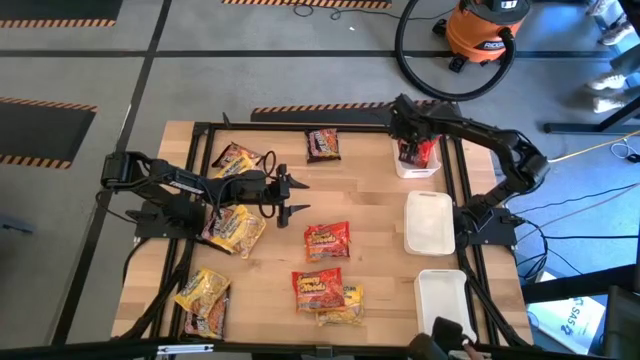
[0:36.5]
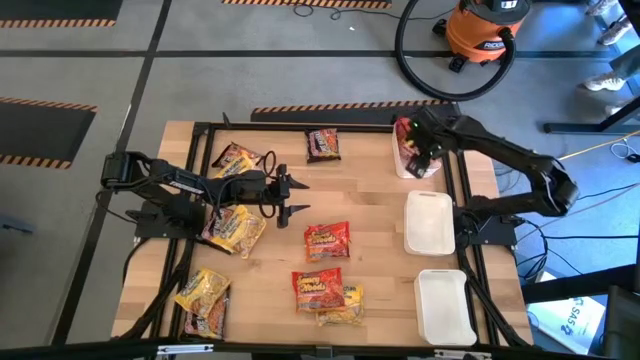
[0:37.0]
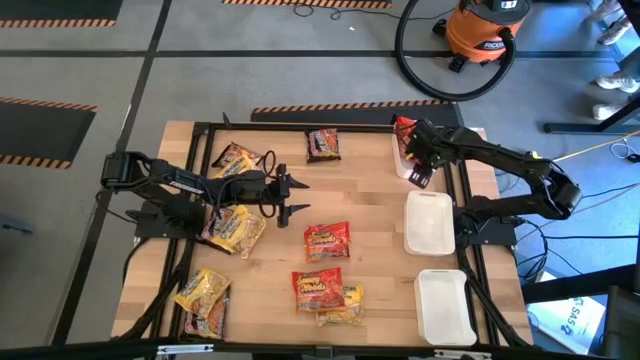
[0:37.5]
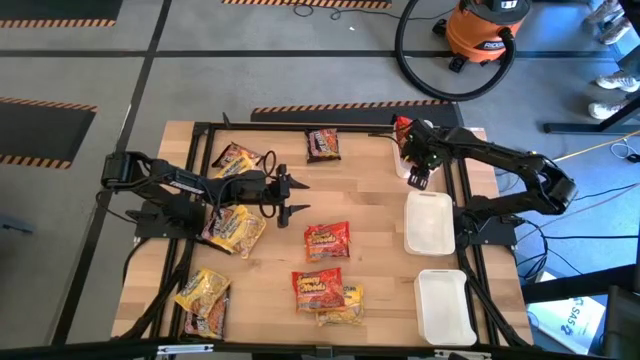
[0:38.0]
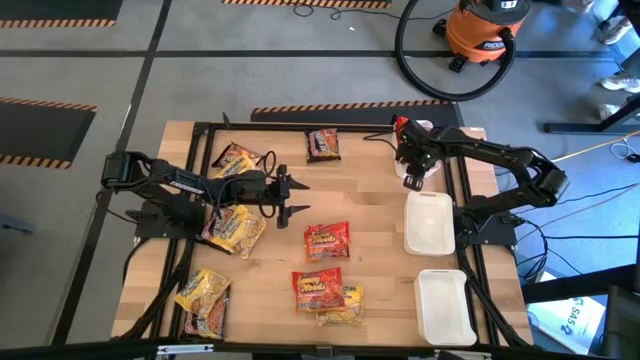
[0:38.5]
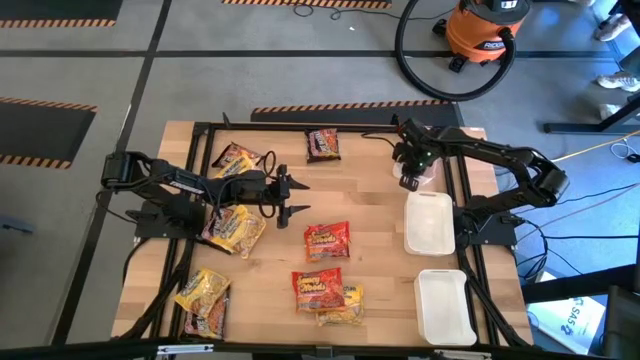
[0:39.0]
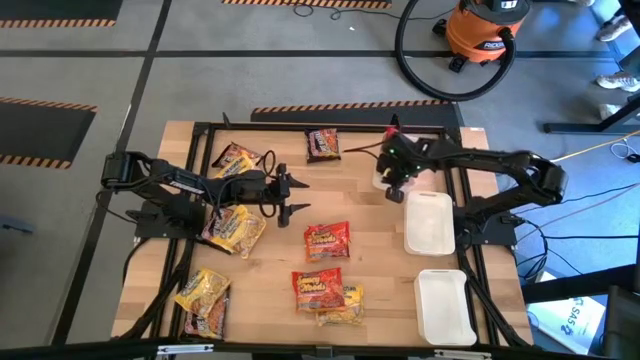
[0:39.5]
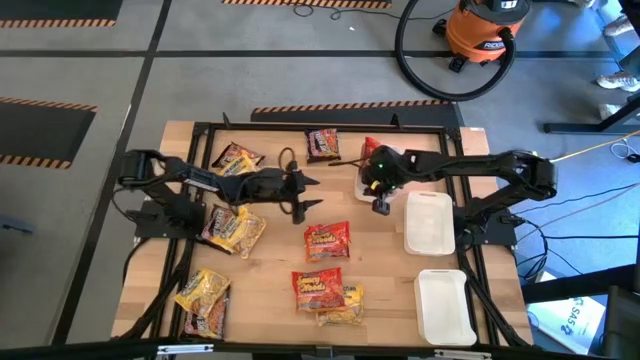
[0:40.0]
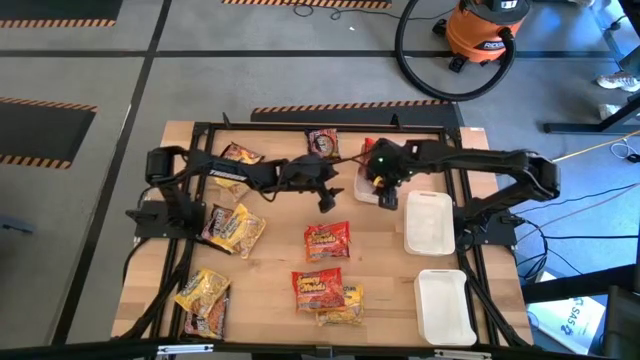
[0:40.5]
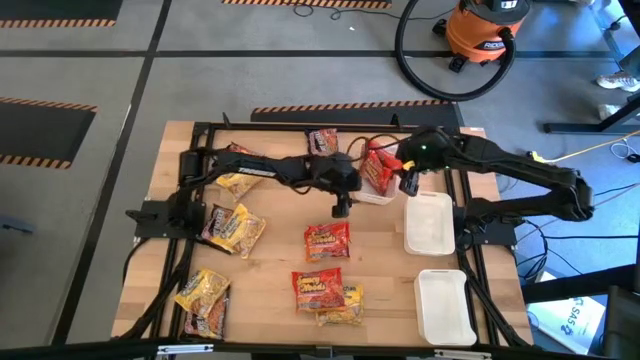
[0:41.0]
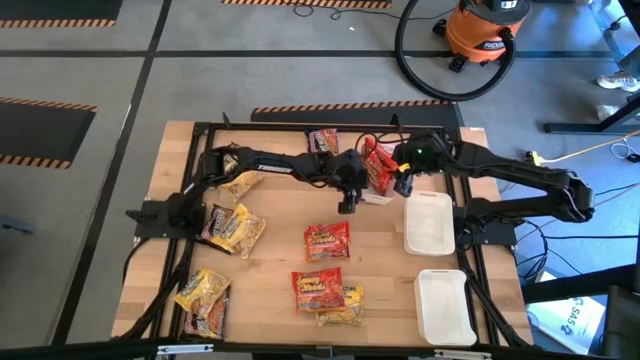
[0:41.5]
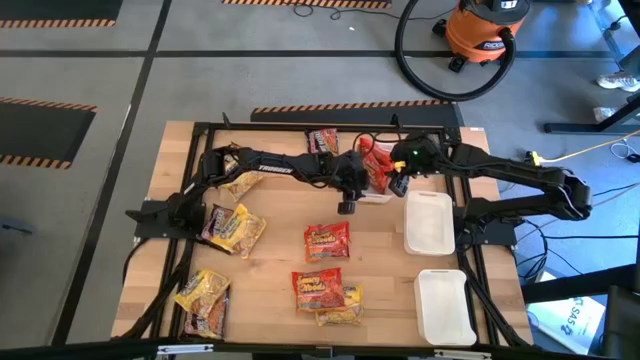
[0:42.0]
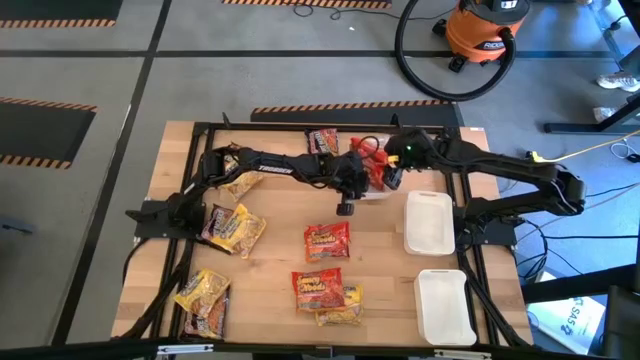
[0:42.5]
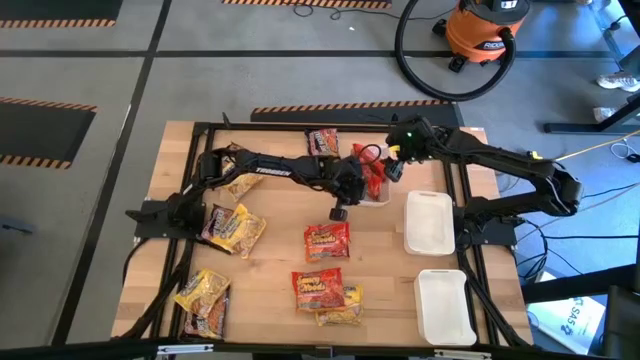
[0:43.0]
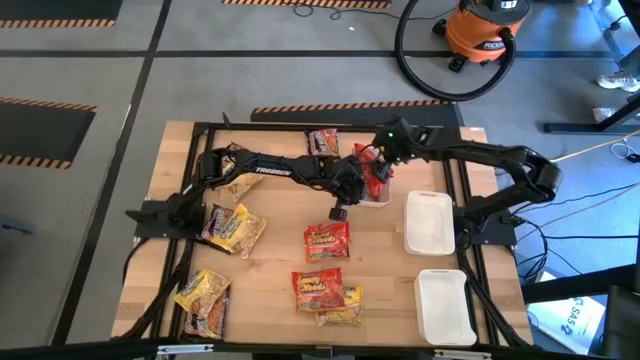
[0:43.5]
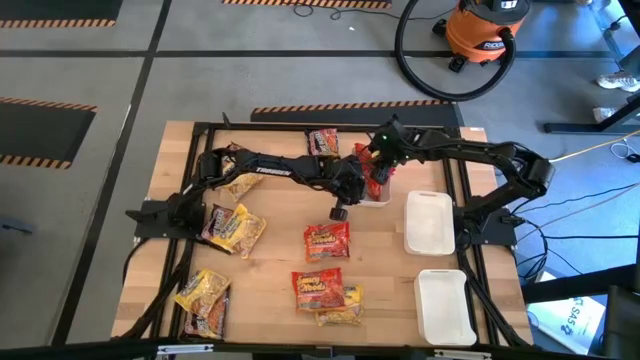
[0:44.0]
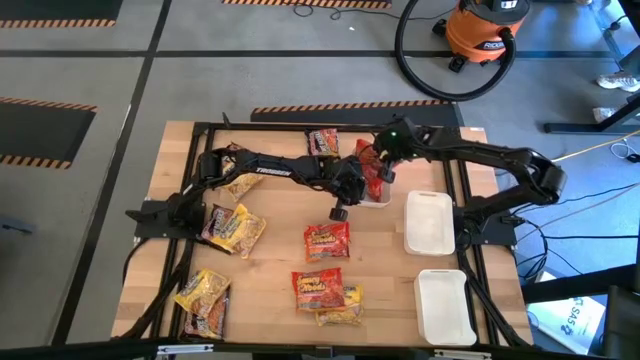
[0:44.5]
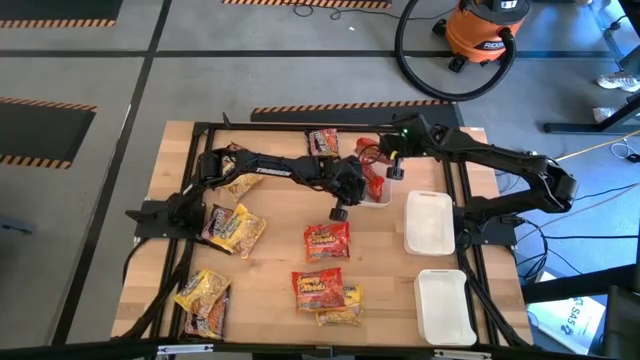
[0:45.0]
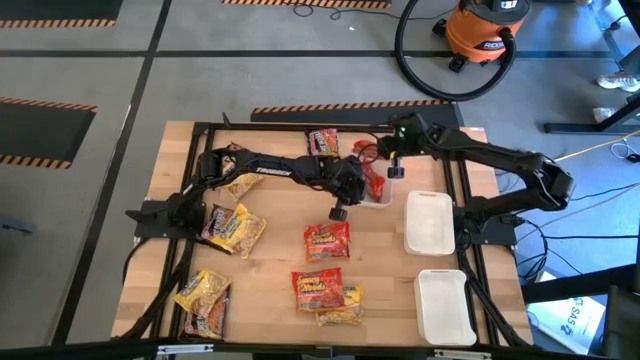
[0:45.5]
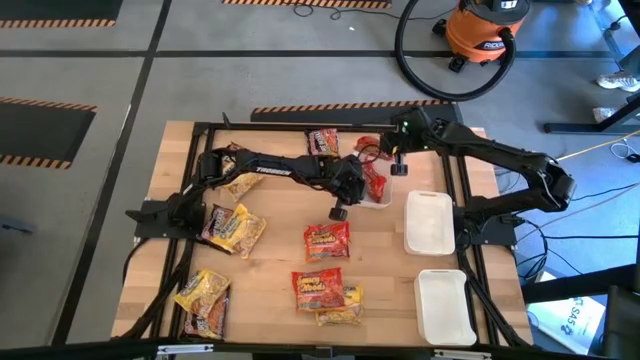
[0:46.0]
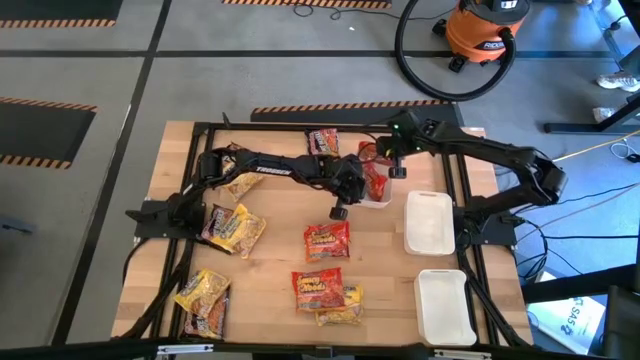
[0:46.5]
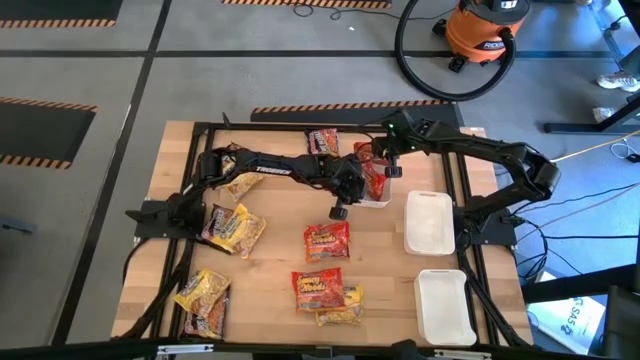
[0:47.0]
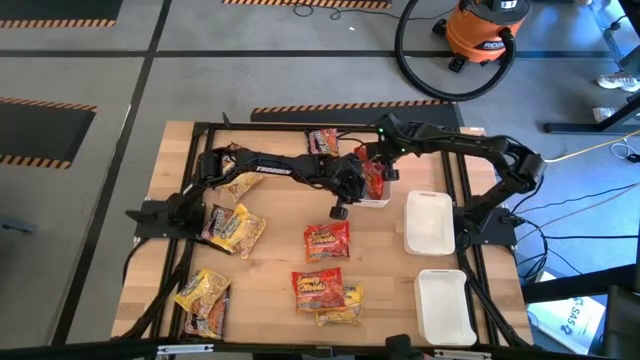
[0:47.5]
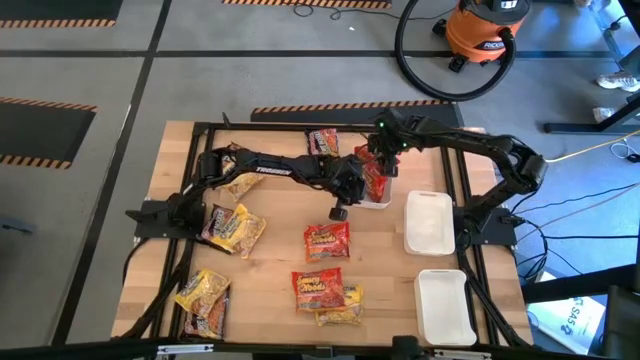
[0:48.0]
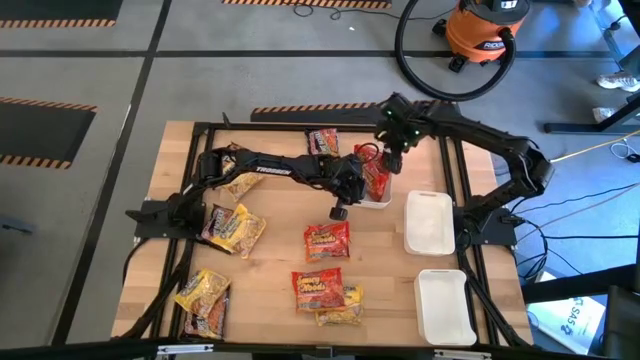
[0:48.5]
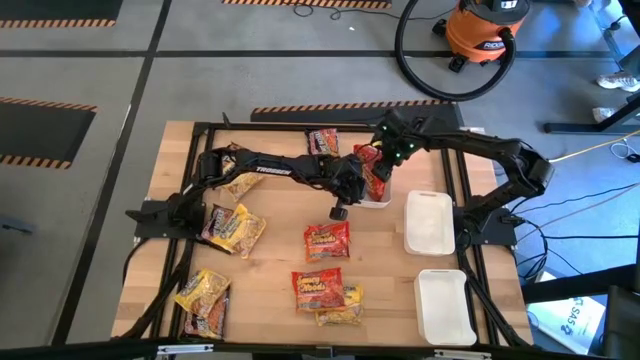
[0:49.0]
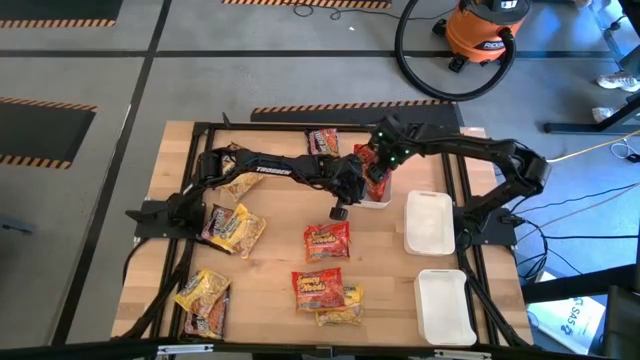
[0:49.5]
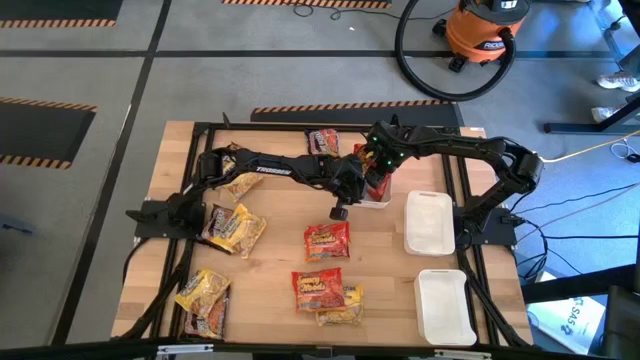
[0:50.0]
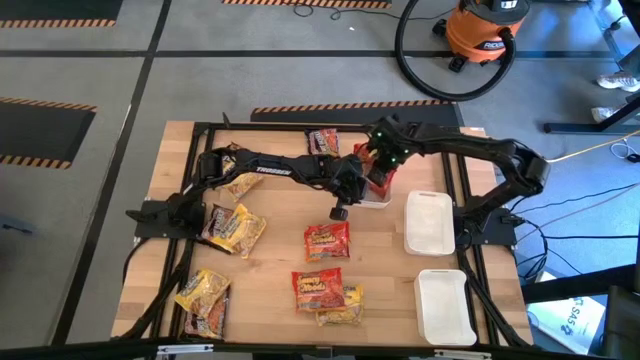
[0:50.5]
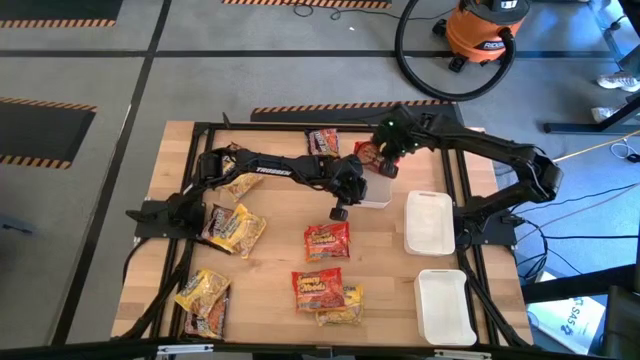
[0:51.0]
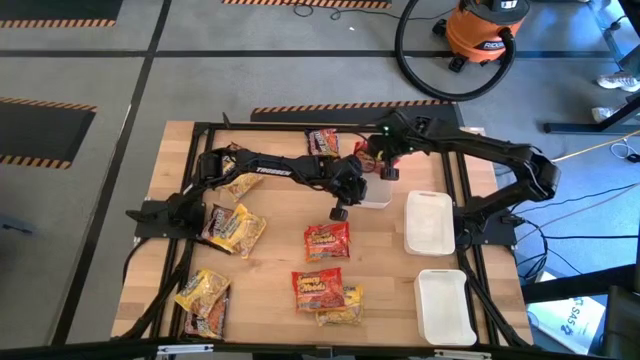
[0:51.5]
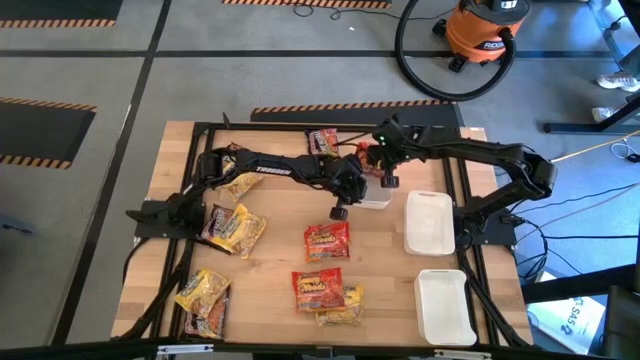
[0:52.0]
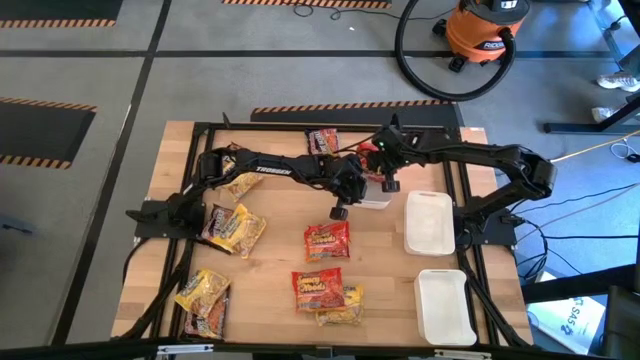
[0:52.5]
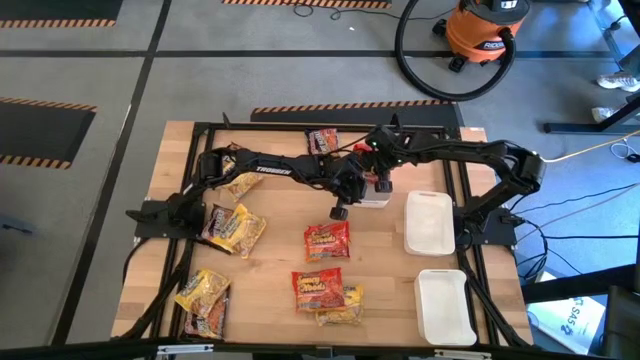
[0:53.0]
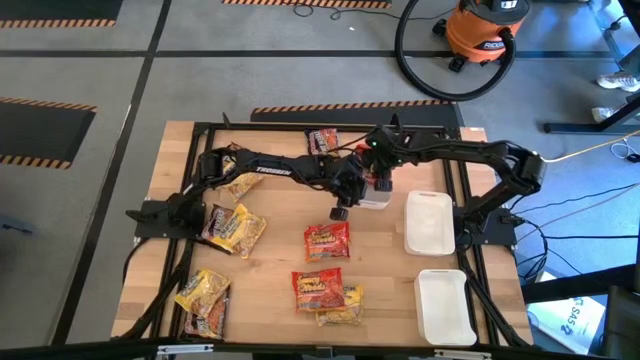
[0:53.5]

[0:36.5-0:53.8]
Task: Sort Maruchan noodles
Adjust the orange noodle pack in the white bin

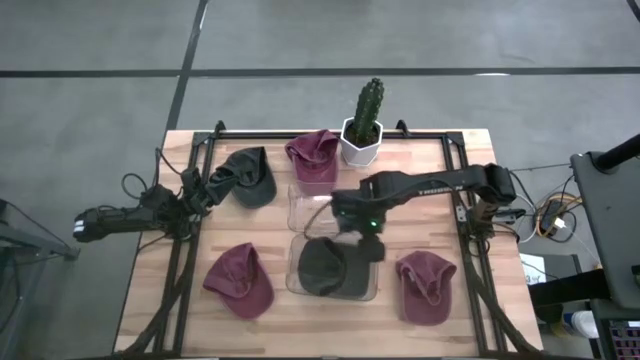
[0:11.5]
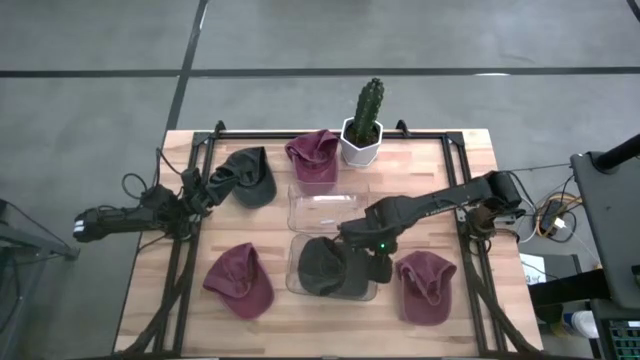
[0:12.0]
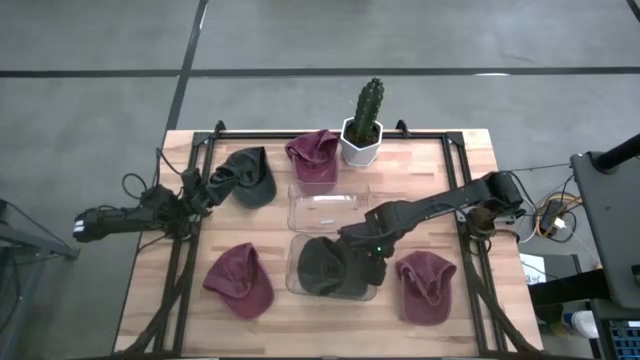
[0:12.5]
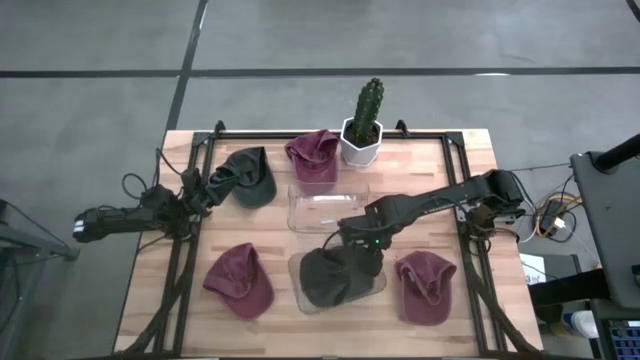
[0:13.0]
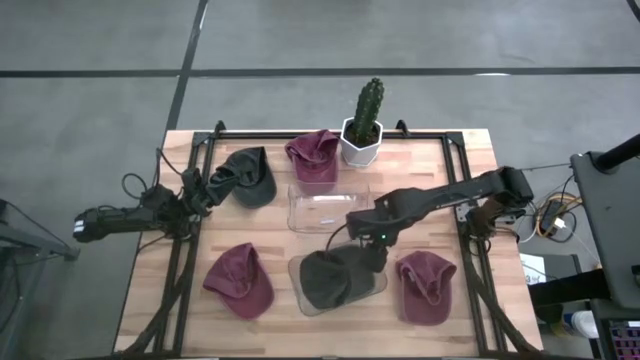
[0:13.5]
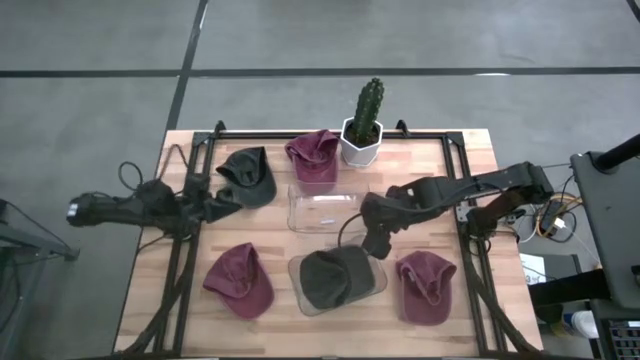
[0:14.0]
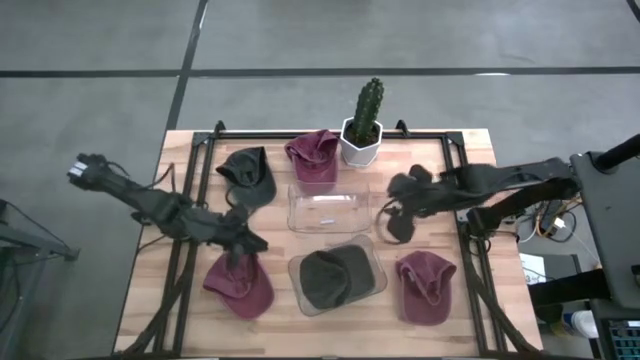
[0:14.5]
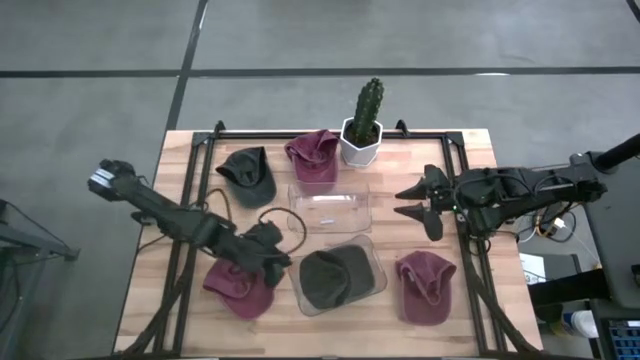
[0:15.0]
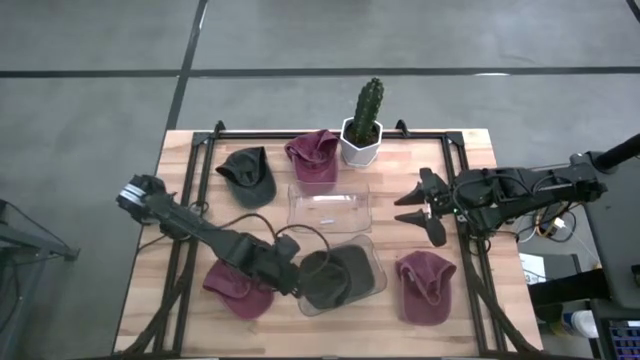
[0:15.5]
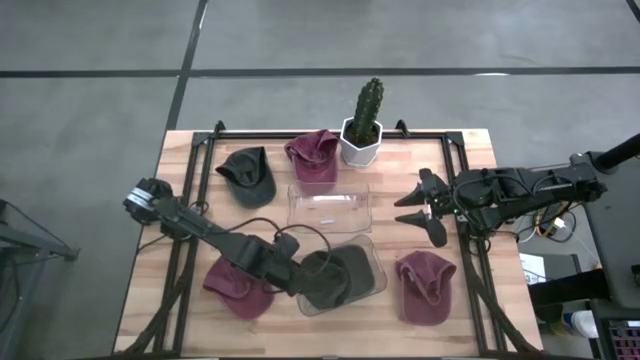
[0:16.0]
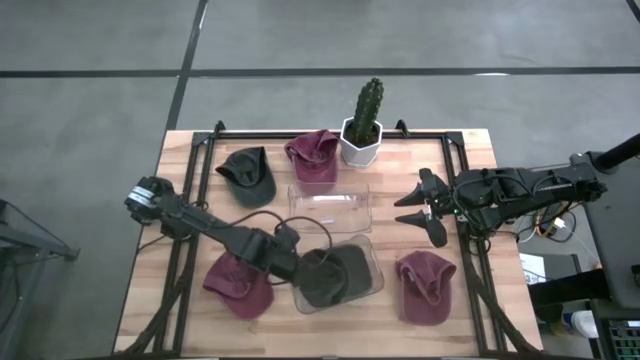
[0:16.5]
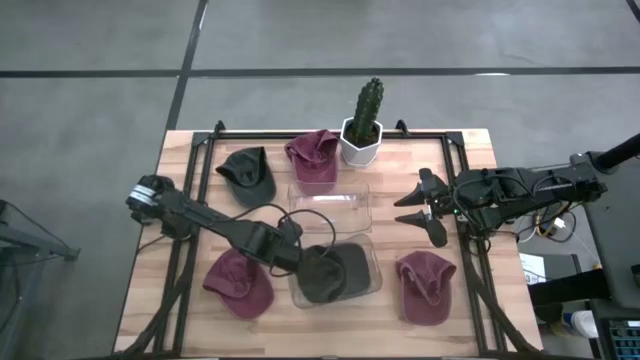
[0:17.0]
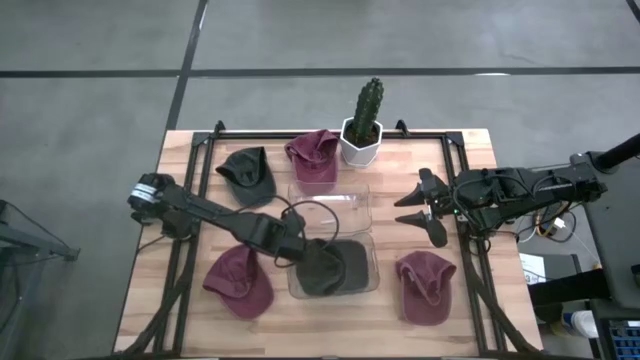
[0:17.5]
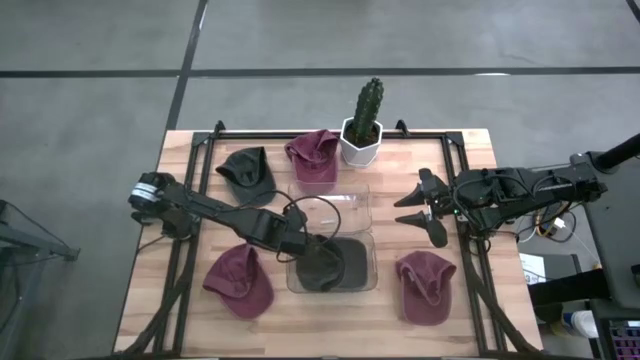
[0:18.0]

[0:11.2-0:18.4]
Task: Pick & Place hat
Adjust the bottom transparent bin
